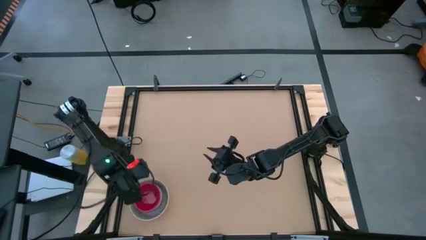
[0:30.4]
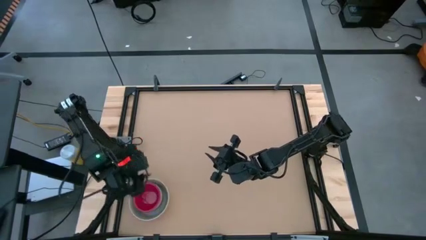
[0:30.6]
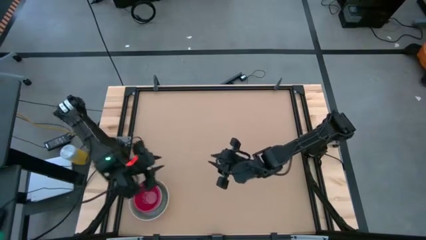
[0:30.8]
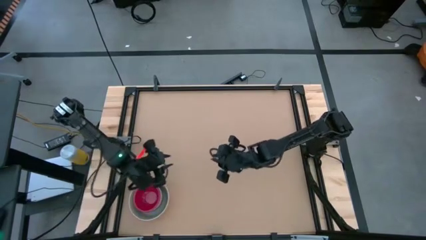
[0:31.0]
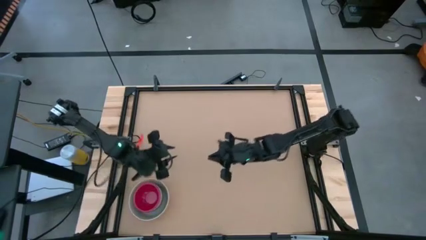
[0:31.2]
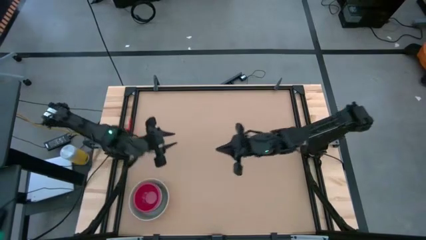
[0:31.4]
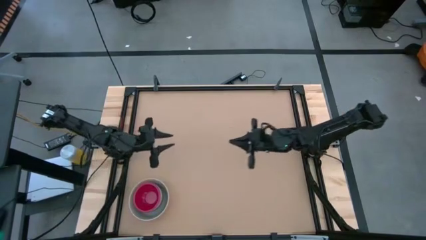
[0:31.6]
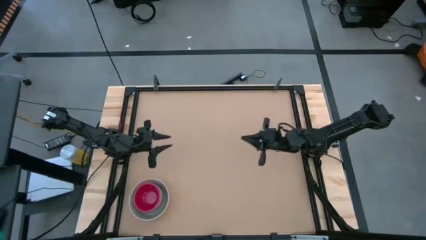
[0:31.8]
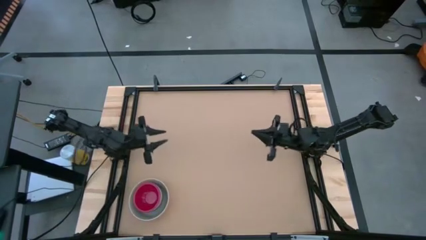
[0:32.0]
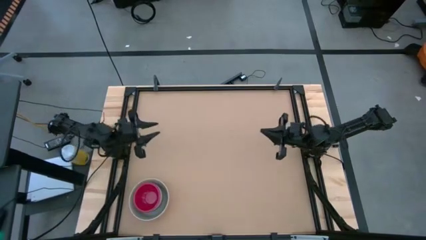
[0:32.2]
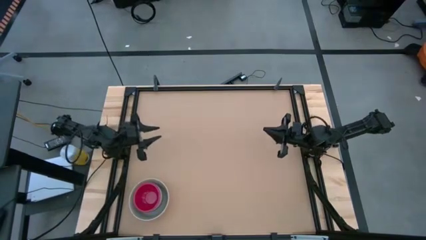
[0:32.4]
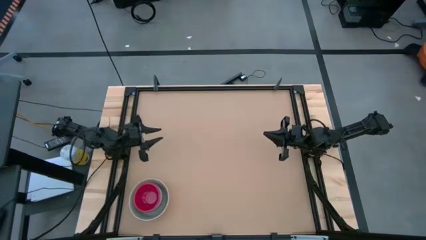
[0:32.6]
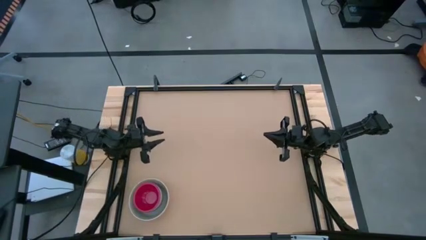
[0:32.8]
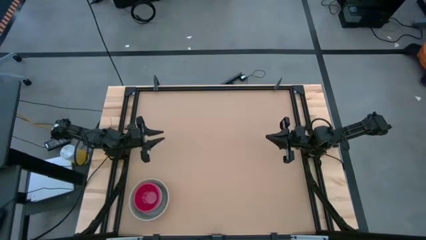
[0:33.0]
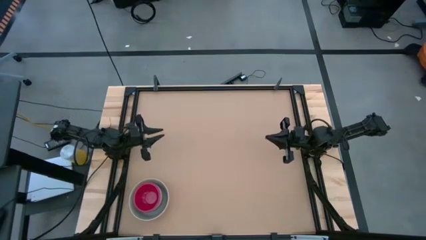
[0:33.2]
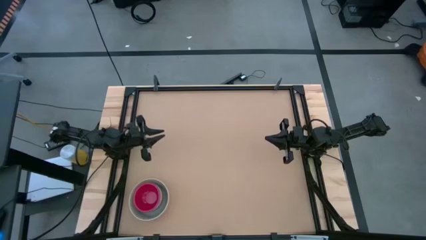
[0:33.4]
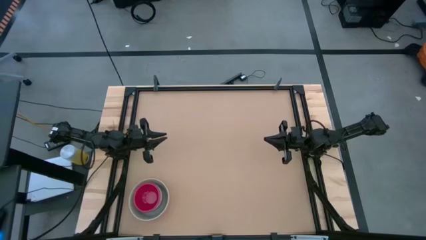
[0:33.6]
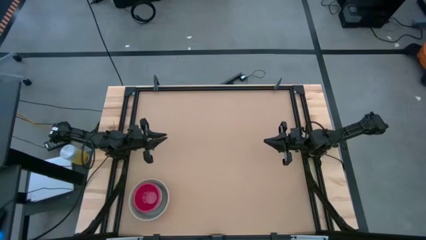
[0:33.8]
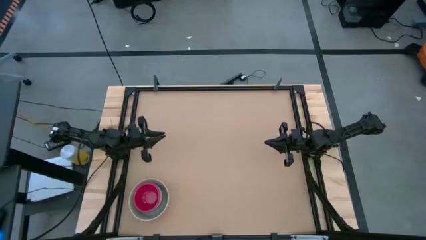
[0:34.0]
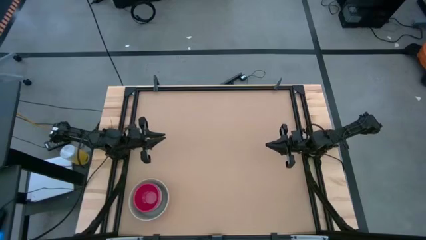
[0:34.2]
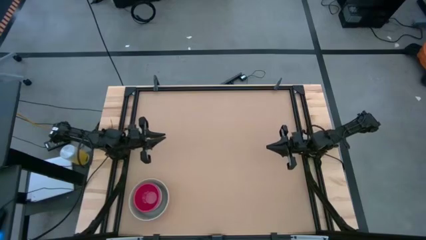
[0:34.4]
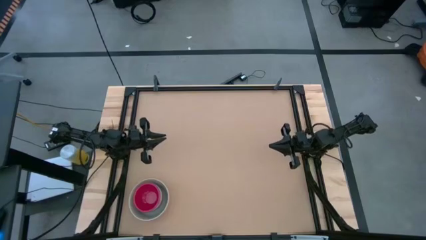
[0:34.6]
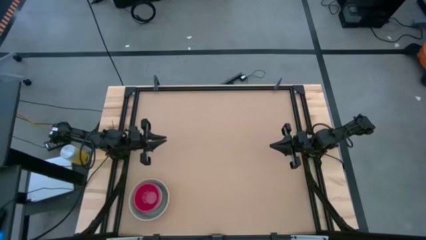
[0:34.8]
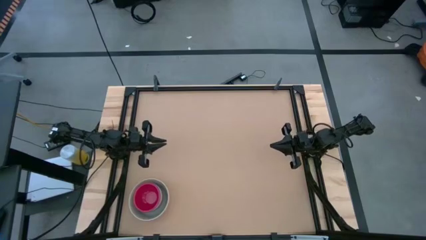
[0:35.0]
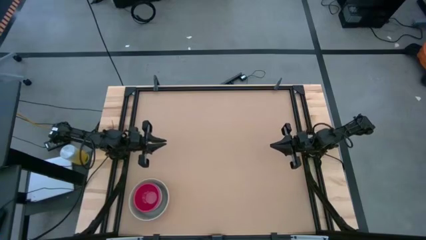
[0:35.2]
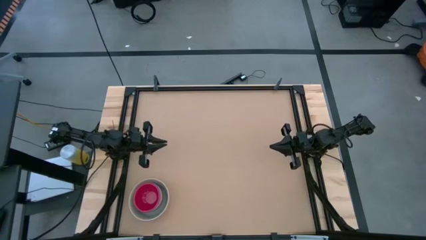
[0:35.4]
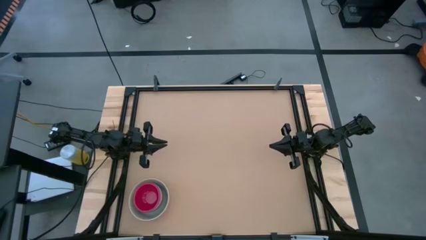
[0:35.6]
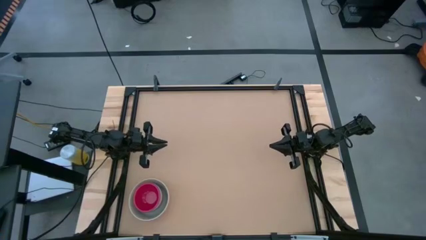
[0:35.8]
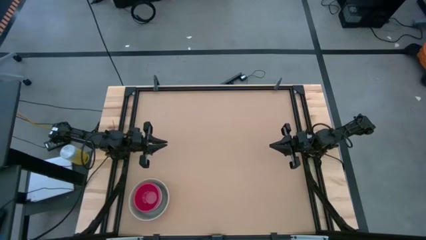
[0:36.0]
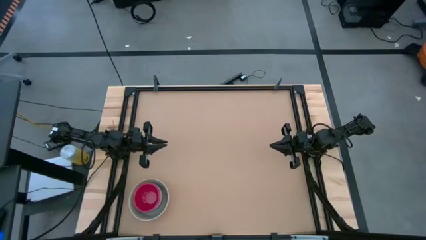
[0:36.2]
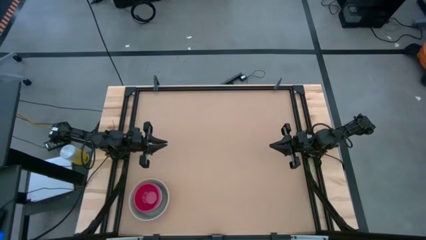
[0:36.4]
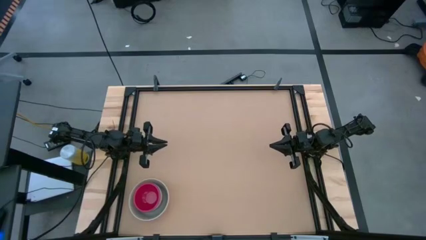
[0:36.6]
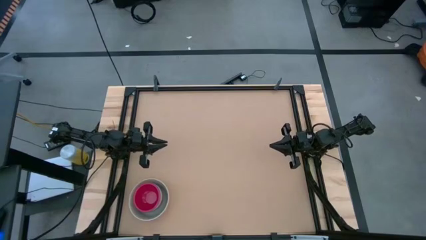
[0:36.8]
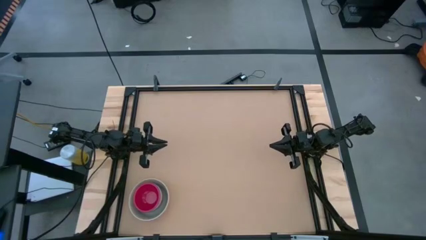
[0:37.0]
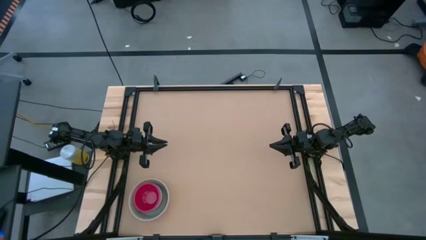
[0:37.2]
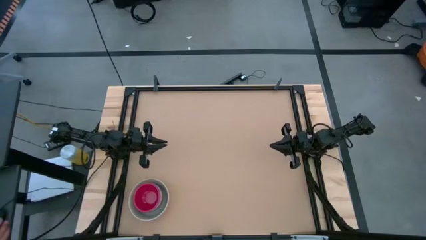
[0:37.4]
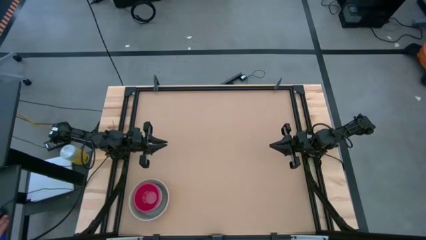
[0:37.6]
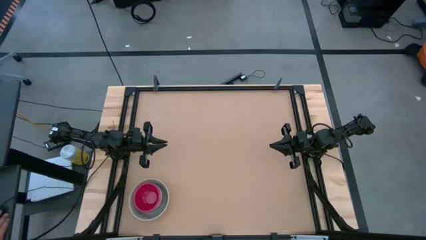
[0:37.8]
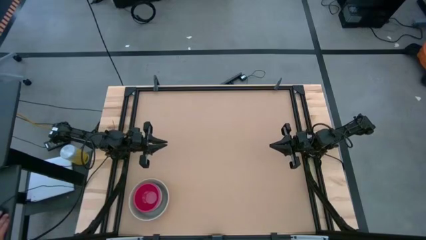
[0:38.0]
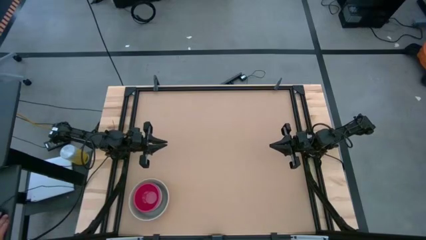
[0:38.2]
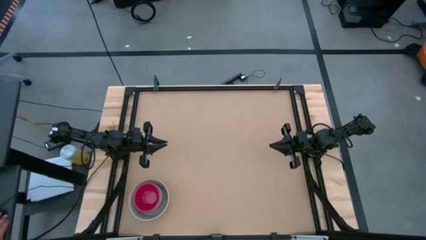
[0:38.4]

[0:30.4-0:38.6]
Return to Home Position
